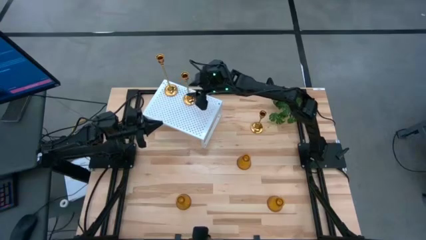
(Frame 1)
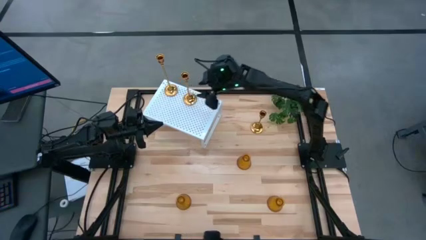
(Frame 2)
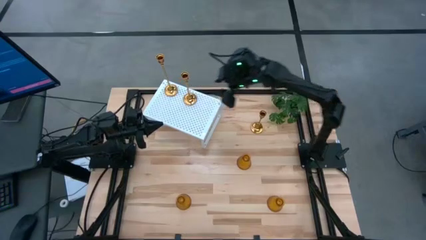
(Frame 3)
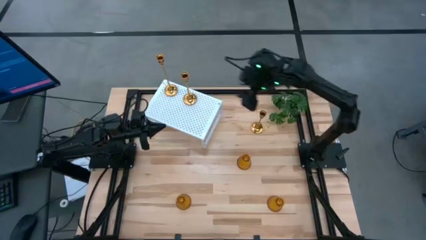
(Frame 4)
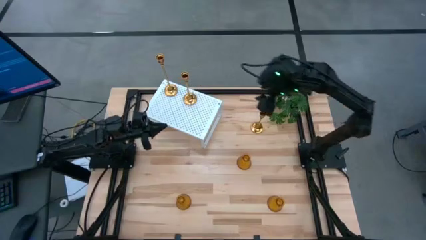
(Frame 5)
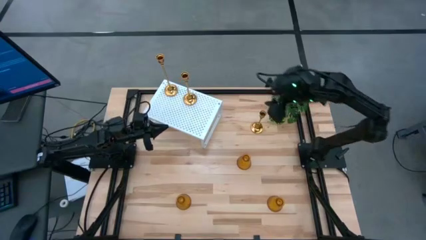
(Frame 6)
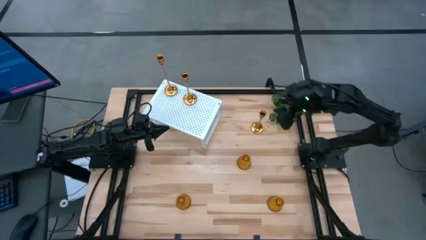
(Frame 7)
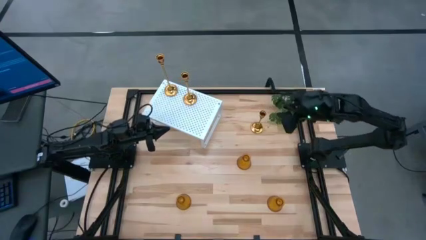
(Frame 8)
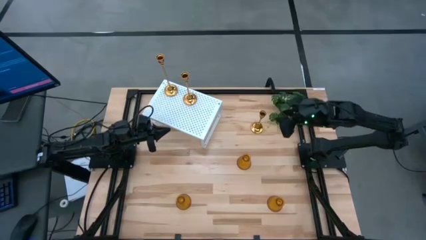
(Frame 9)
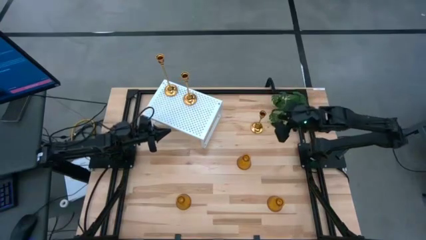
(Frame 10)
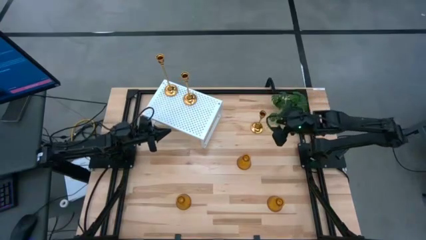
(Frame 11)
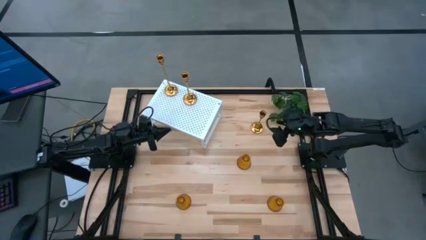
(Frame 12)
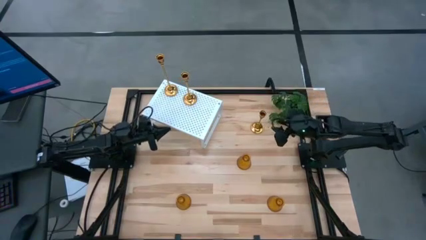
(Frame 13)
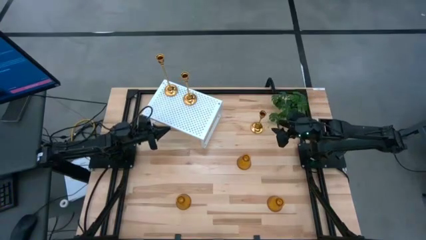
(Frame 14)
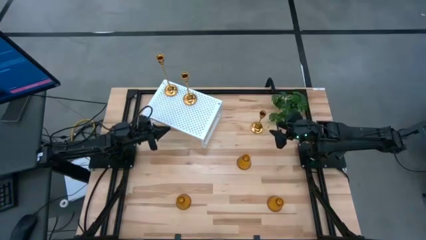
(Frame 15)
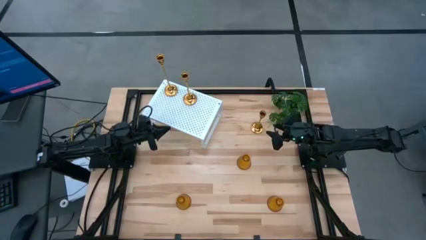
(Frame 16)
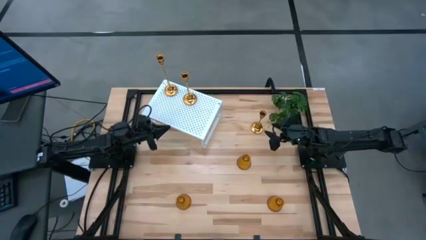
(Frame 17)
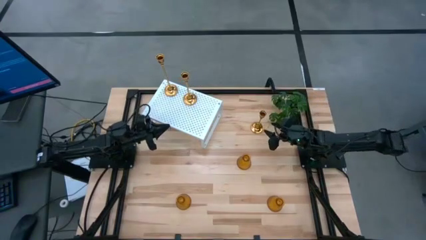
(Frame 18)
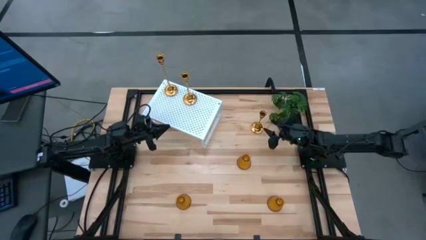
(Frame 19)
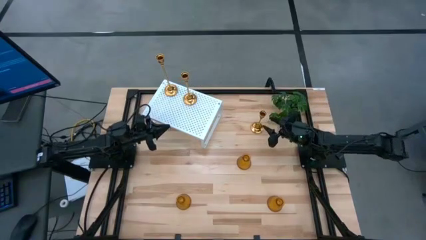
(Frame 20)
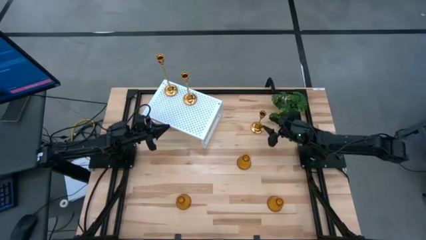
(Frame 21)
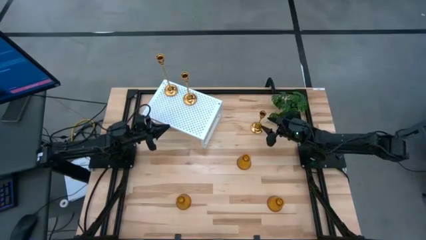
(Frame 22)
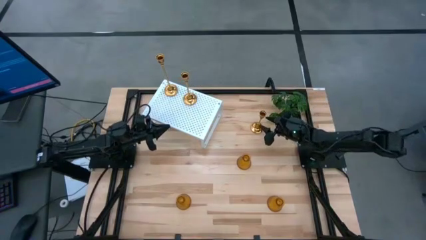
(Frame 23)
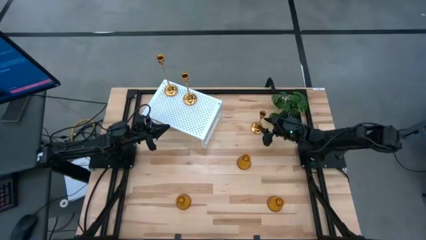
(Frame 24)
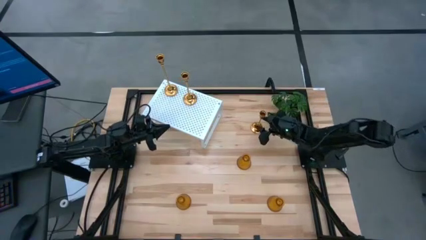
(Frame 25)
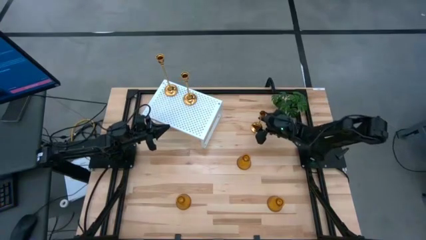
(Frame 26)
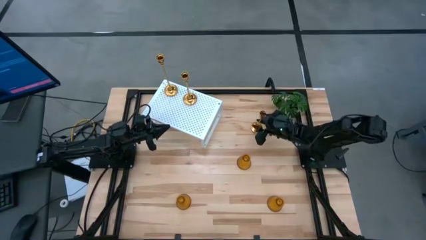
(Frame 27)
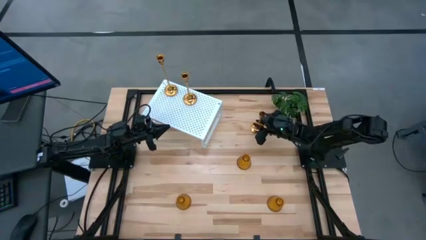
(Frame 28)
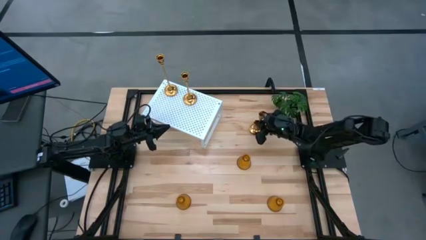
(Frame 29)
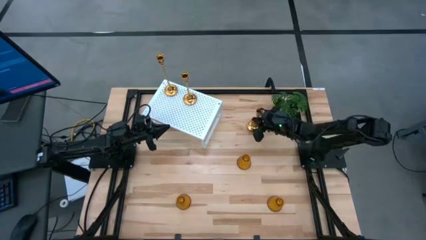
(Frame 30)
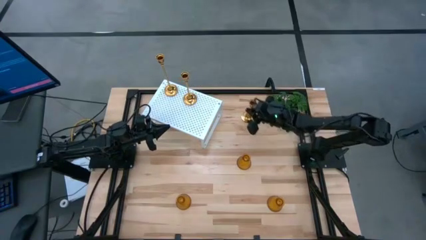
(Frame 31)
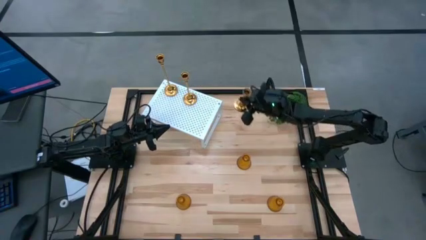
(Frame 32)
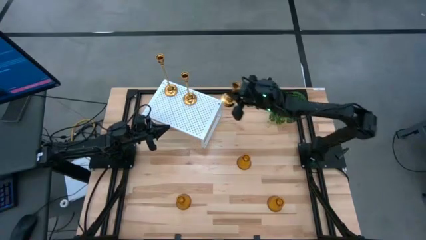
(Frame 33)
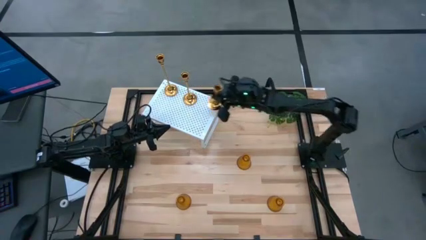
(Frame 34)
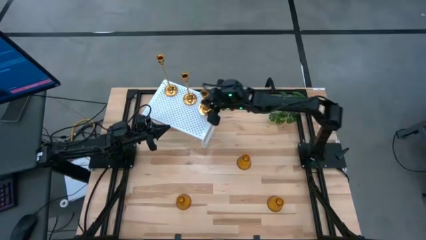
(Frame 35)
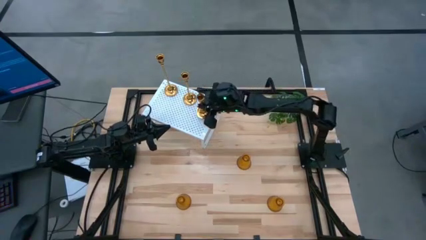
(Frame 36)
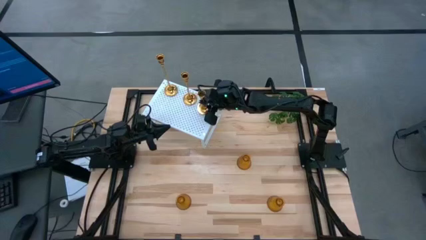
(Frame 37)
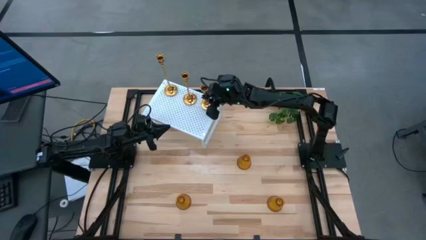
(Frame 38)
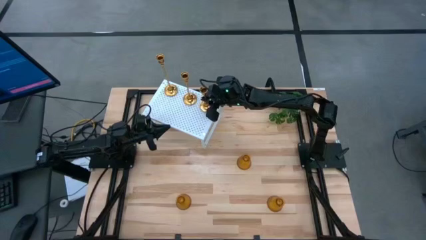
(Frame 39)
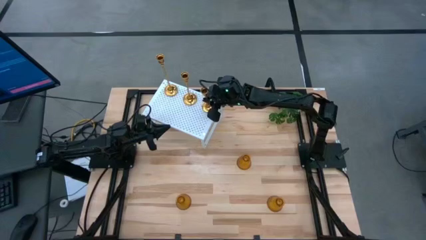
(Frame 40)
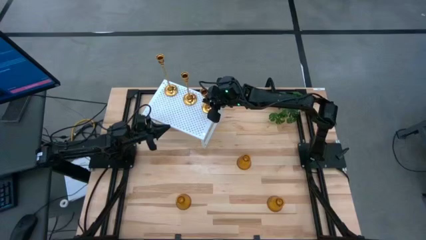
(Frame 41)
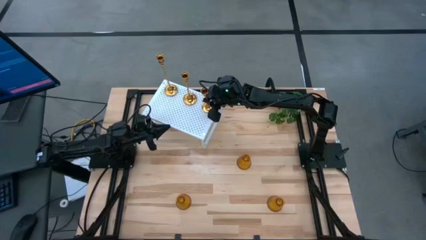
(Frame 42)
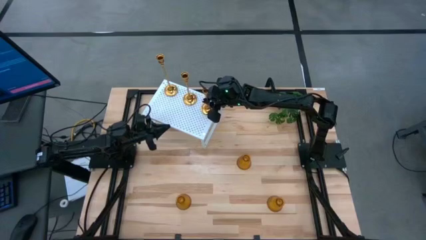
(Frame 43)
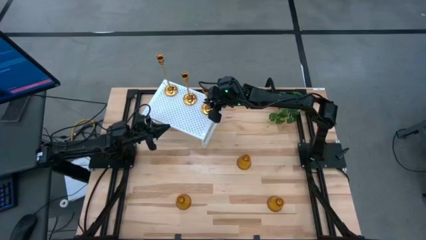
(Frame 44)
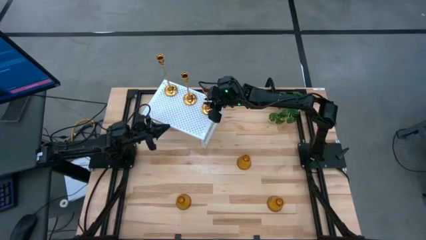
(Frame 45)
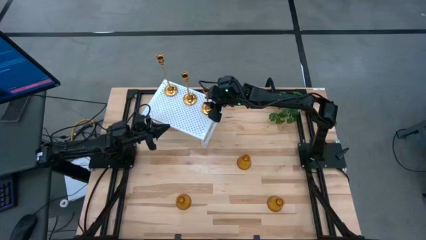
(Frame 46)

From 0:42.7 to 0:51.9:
Task: Pick & Place candle stick holders
Put the gold candle holder on the shelf aligned with the other gold candle holder

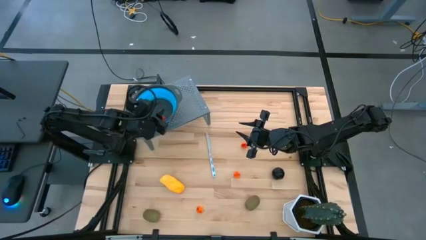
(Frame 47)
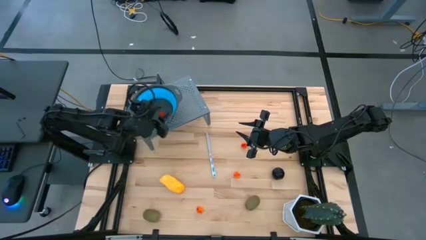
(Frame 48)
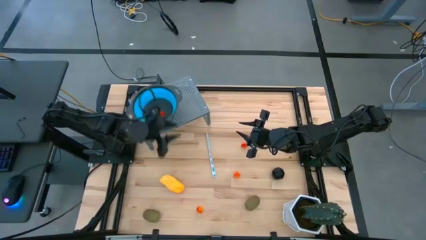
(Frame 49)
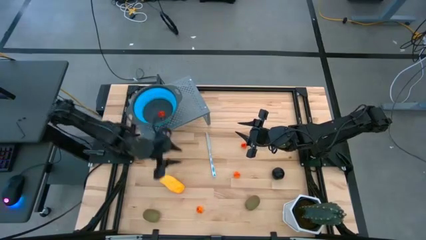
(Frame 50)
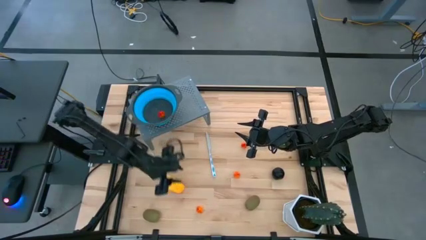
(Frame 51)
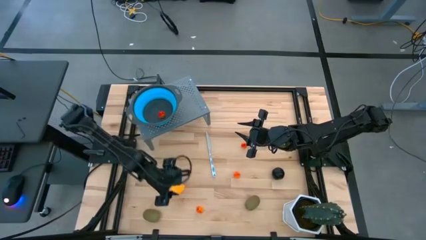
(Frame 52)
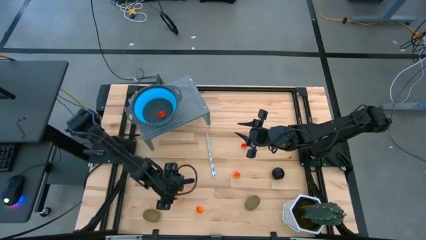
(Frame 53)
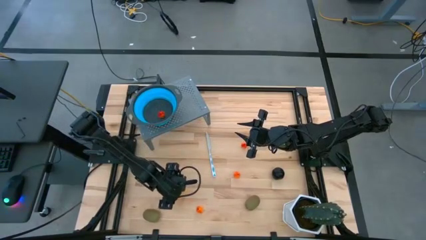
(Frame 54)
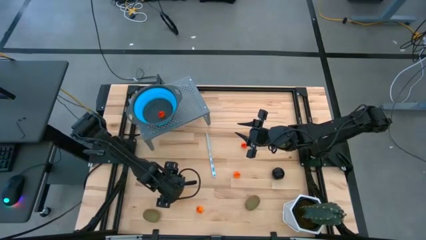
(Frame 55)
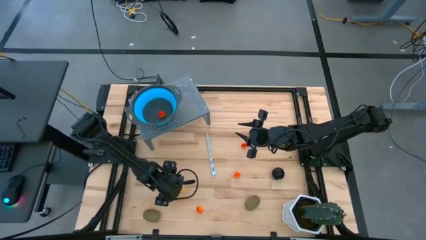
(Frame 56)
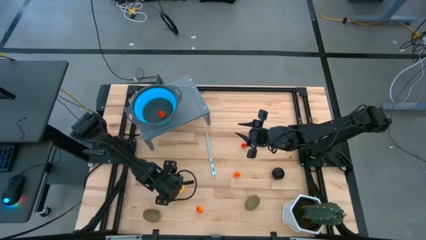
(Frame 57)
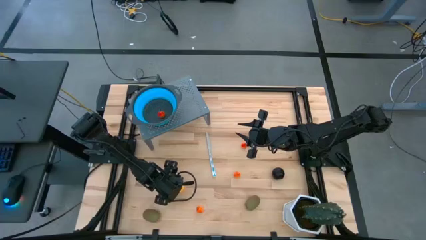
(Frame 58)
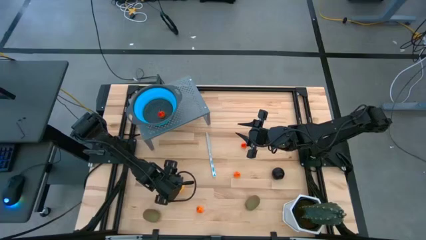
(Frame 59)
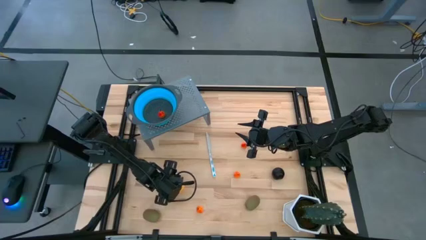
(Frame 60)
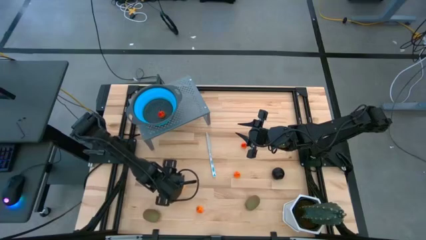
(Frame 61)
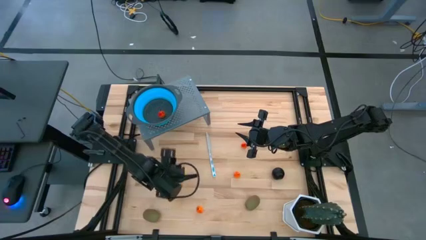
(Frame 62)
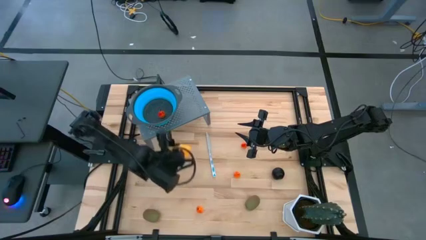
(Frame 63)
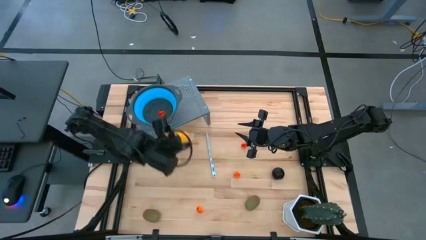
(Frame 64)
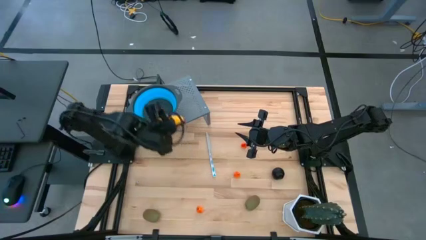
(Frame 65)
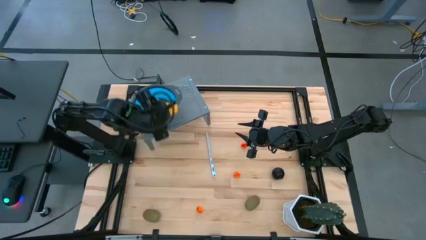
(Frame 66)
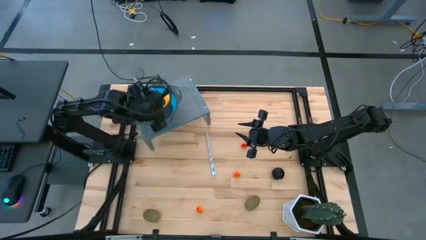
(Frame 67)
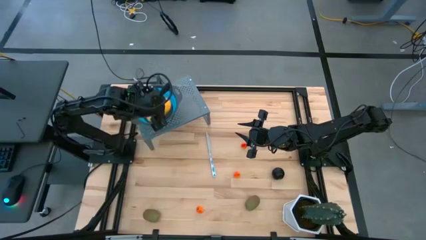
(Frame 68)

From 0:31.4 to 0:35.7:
Task: Pick & Place Fruit
Put the yellow mango into the blue strainer bowl on the shelf
